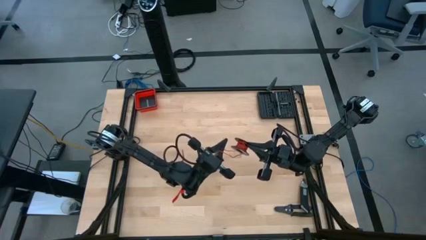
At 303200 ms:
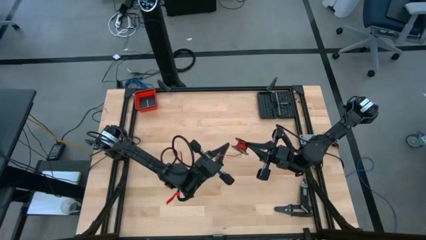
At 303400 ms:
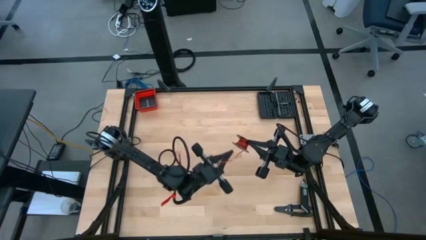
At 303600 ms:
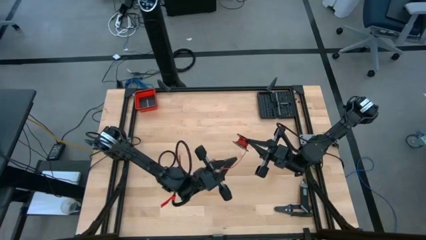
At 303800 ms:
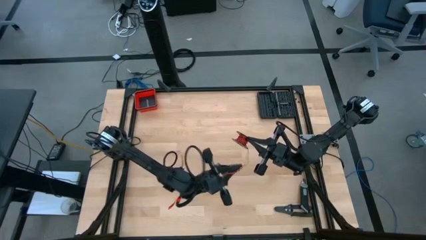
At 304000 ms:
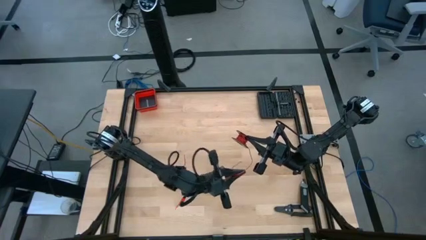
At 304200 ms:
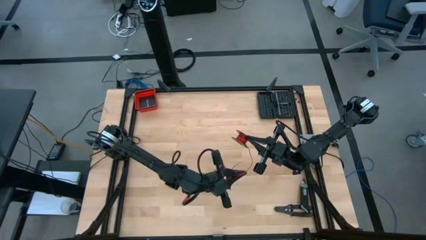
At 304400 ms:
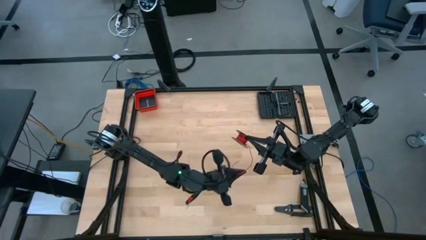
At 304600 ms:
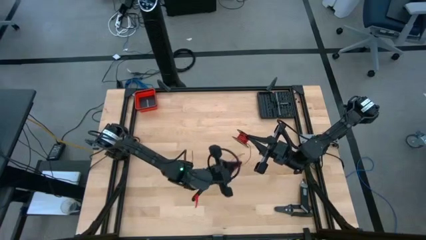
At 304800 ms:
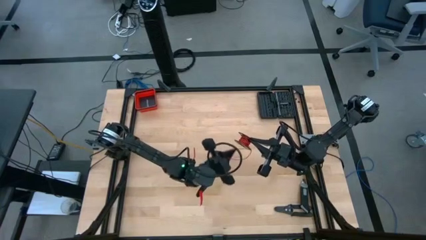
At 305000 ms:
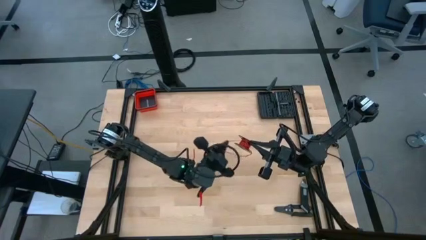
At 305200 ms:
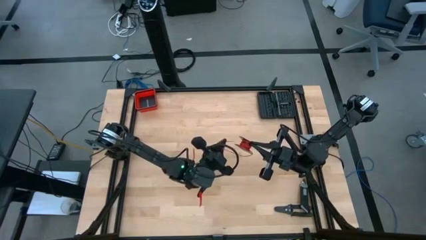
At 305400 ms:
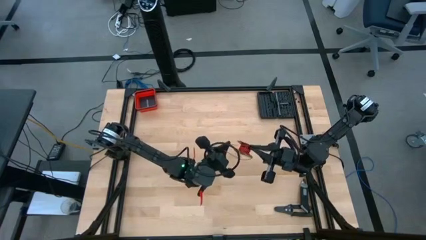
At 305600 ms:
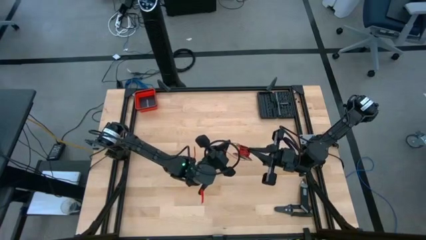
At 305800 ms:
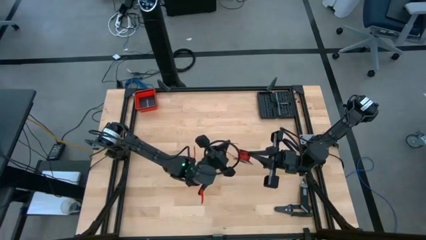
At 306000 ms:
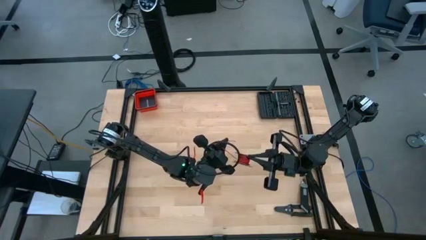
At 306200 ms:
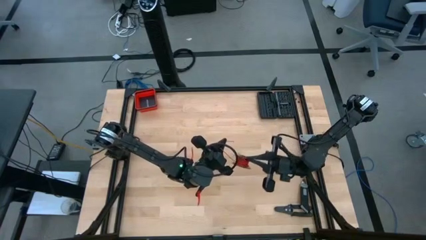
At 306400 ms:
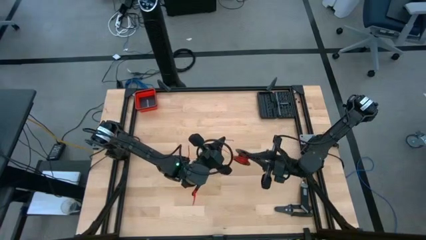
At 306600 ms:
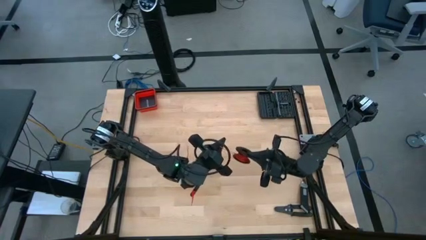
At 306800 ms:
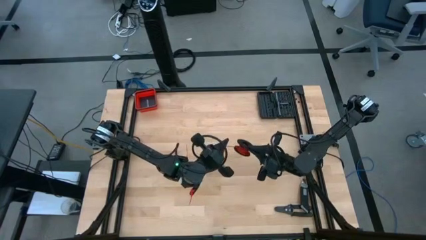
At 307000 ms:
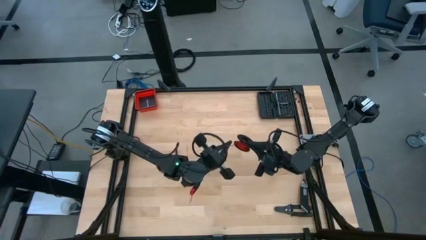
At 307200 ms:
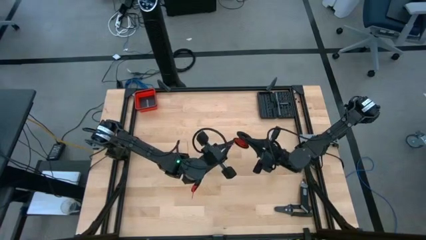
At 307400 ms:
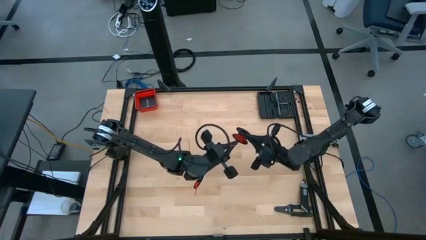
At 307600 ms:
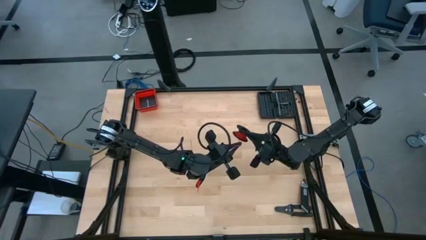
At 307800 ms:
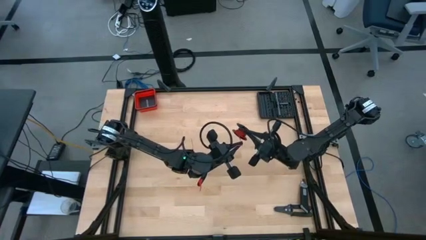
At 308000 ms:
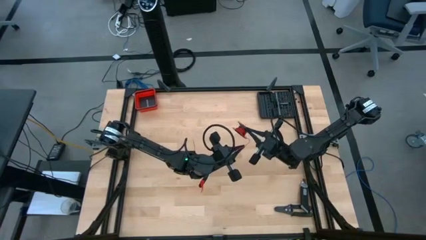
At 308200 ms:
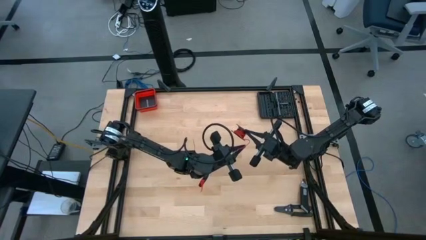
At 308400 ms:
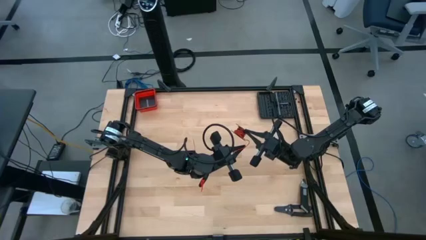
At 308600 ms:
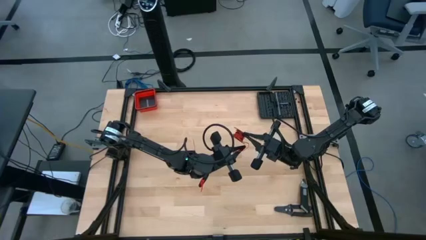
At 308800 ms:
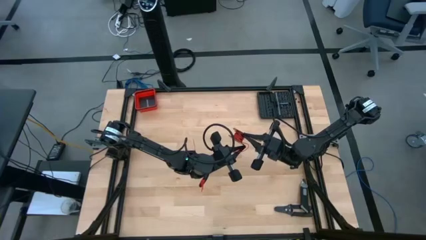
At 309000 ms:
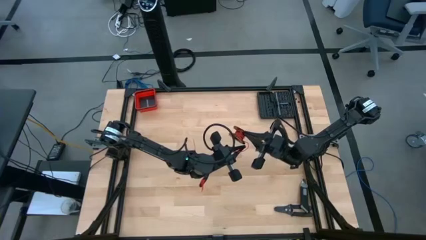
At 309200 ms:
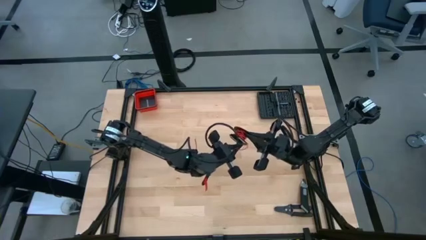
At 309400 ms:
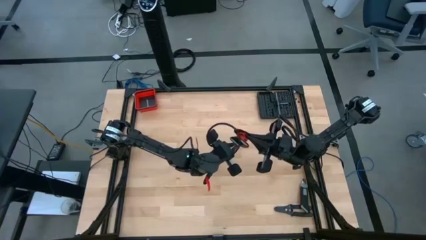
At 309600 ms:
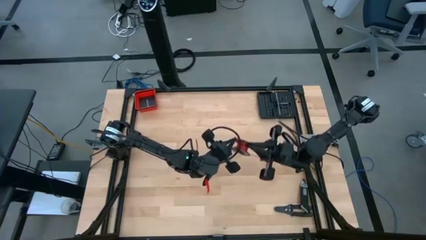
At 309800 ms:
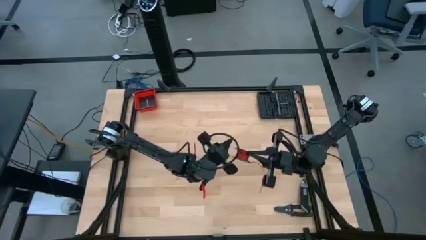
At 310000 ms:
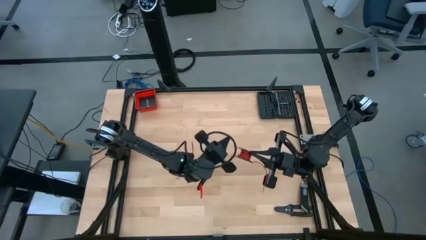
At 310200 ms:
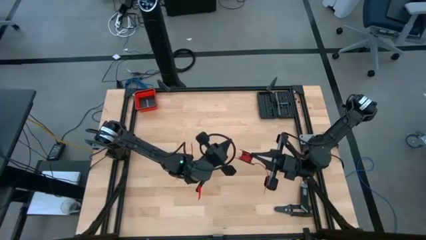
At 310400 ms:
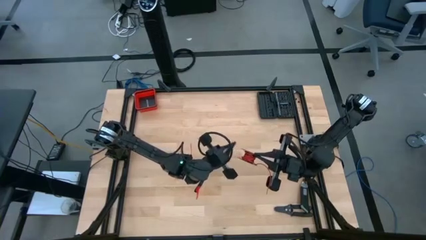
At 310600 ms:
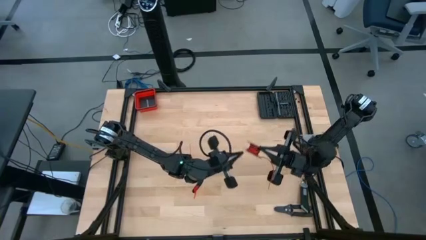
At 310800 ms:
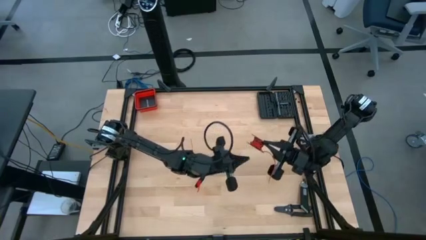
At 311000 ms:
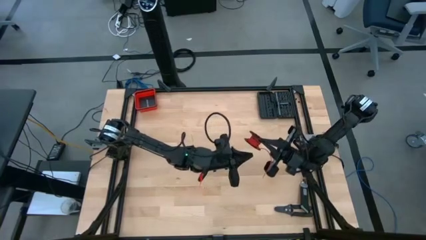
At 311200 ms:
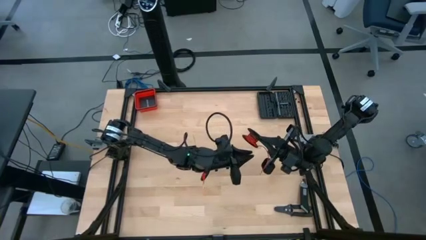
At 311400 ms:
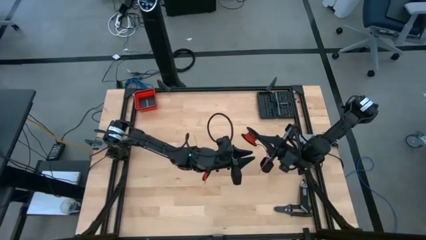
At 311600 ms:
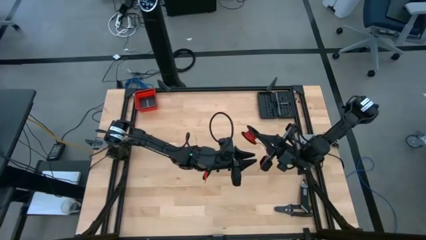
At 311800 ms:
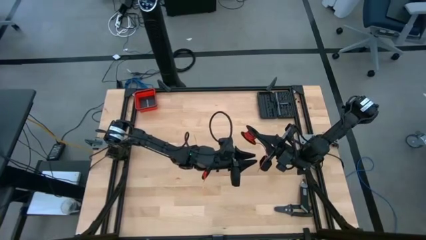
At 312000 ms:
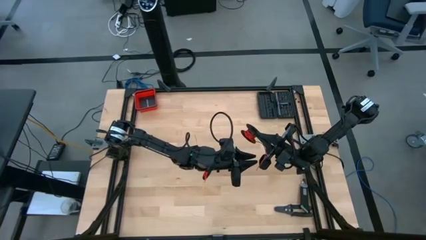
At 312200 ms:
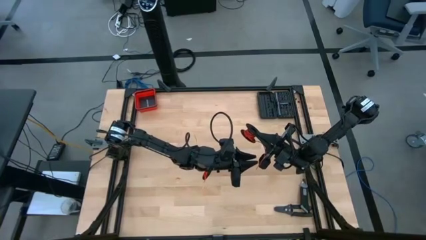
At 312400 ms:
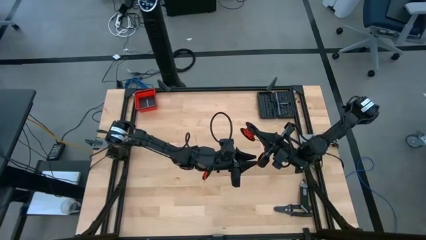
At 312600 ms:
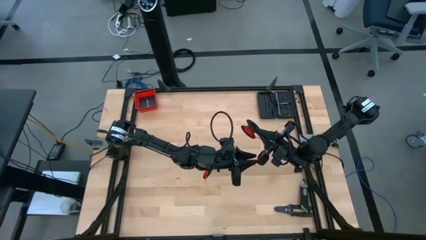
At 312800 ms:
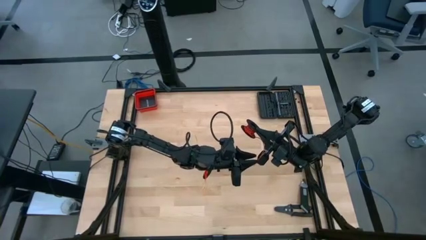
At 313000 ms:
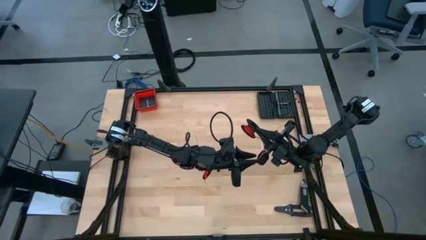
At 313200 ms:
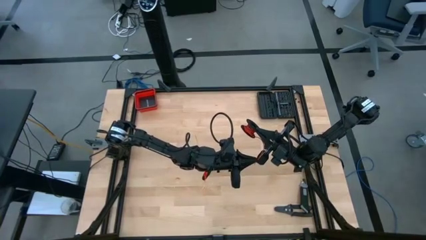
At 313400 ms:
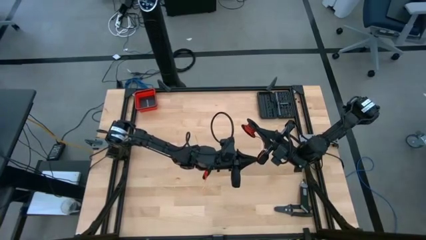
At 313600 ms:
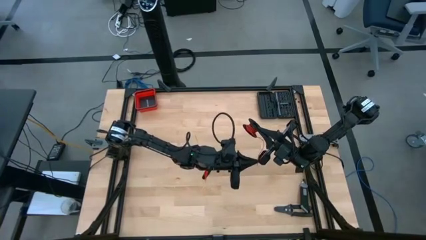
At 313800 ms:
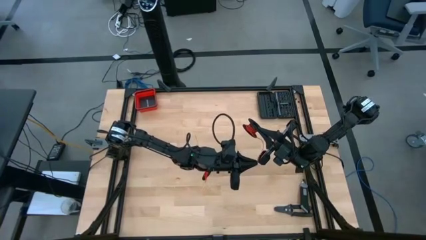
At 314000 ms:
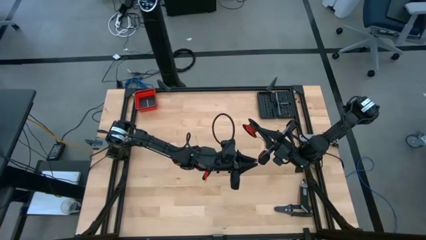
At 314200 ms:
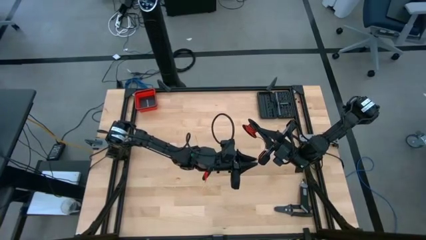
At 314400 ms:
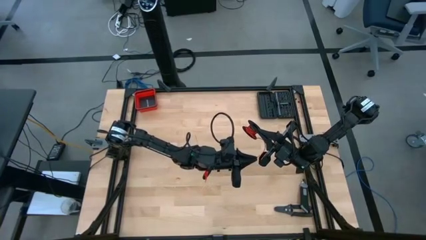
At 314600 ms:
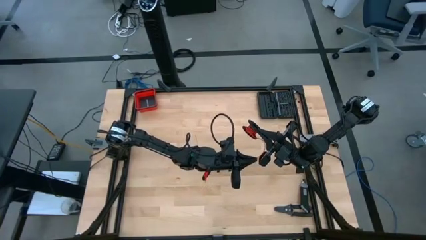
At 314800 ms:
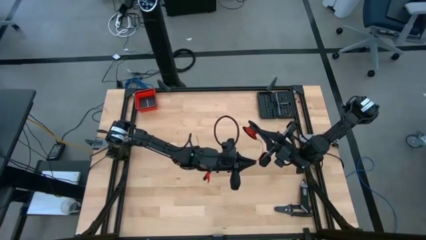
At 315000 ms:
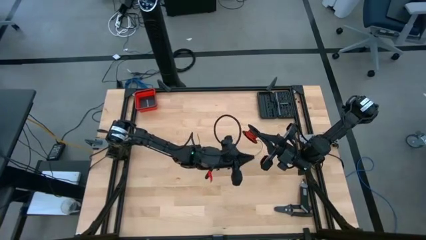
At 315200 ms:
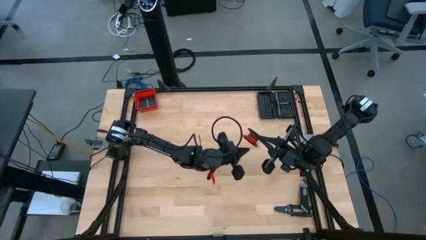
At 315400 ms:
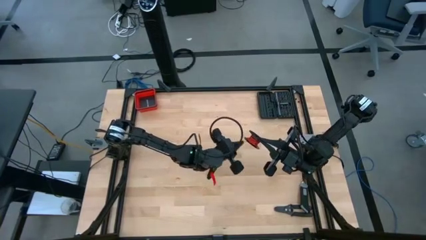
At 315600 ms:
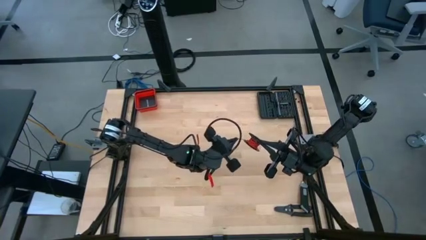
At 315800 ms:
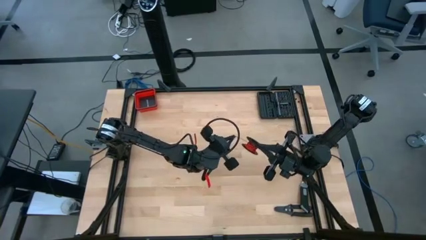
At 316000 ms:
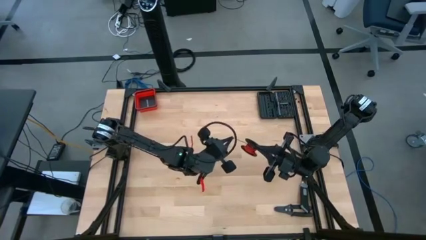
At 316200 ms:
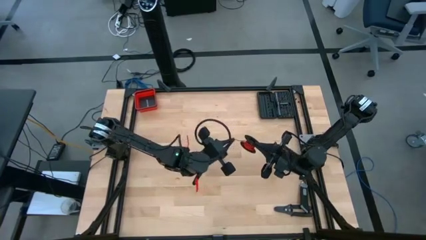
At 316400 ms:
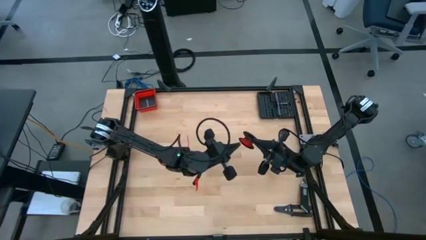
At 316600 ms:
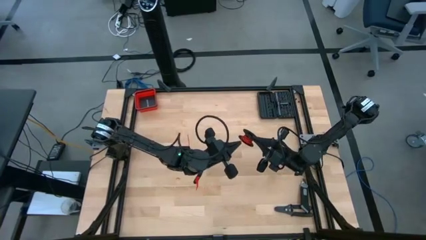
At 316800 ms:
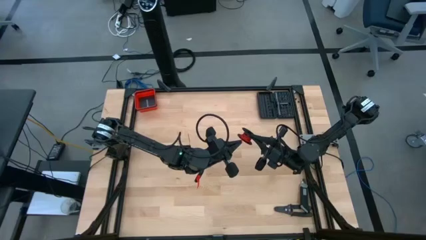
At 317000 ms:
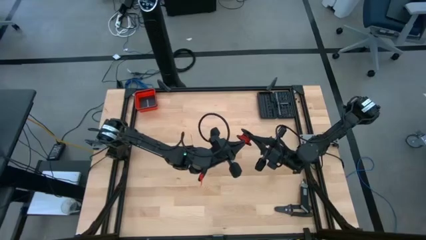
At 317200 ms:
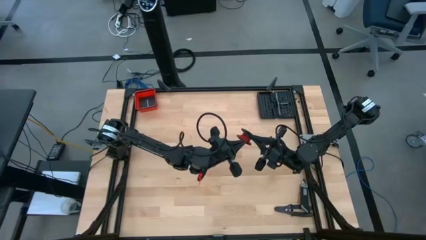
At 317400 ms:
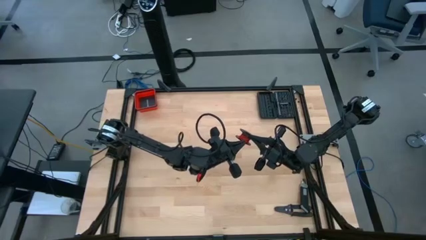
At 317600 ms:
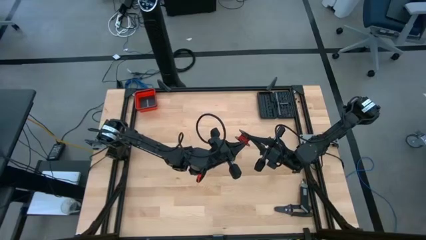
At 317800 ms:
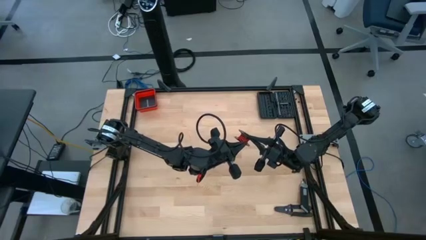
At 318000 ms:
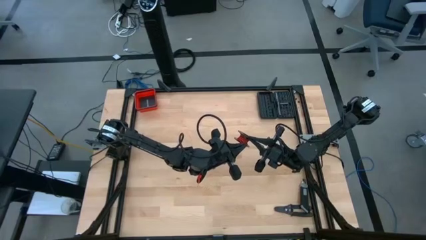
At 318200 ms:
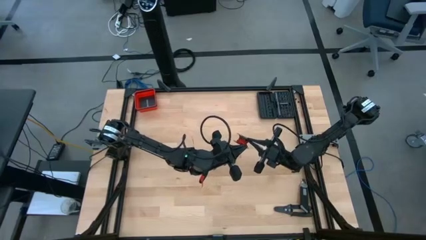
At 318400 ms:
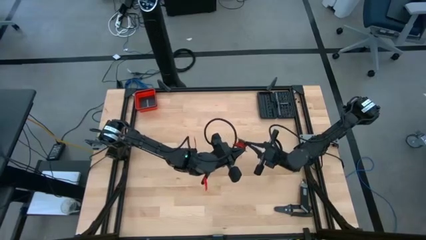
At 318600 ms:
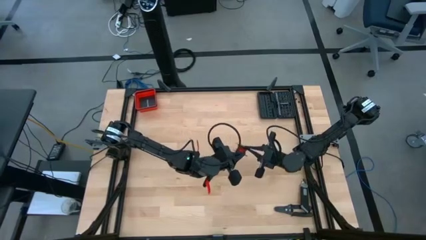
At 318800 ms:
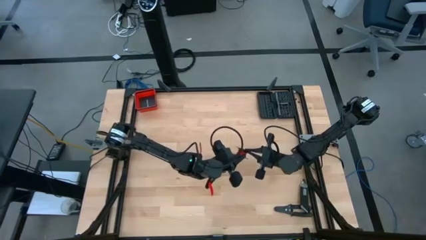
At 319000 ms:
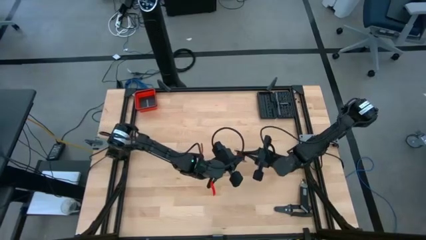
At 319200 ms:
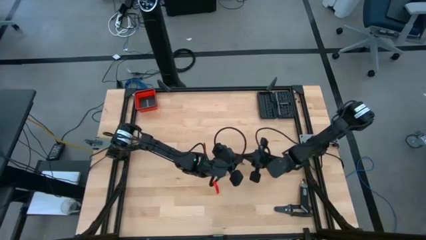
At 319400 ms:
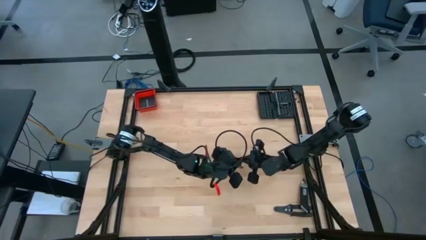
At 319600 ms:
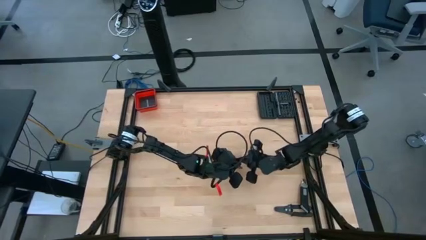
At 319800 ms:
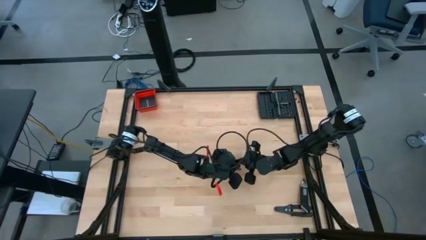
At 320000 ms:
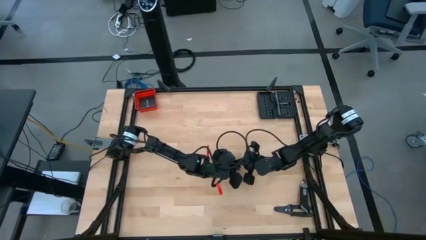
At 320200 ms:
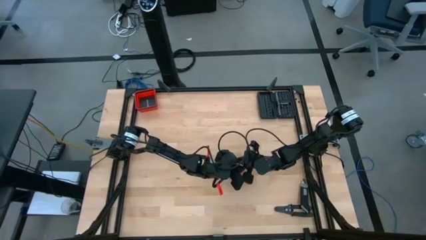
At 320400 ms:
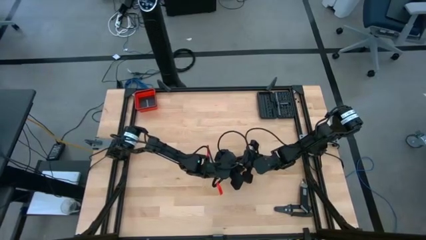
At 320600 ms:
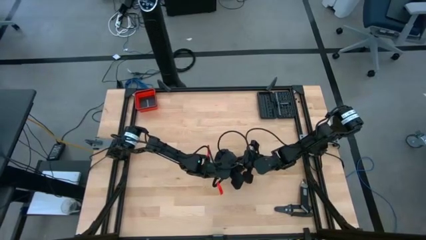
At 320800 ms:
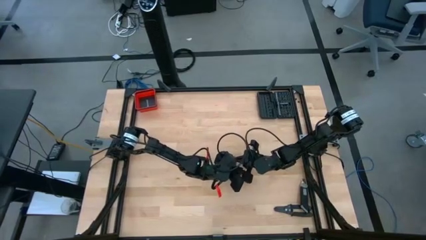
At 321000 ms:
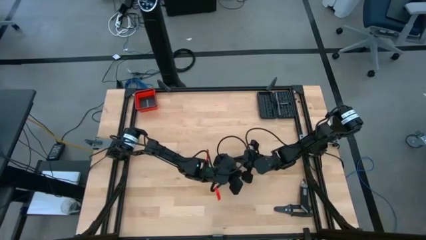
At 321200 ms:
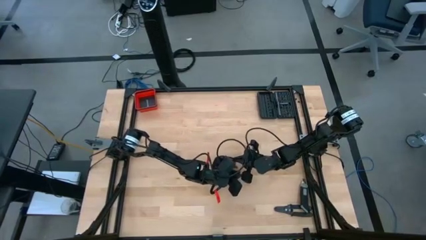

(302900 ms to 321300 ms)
Task: Coil cords
Coil the red wire onto the spool
